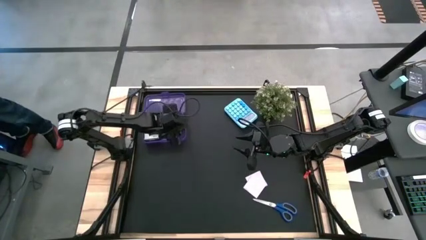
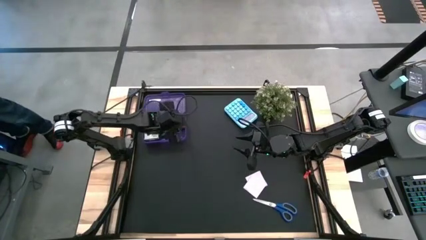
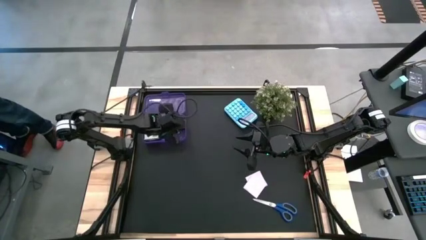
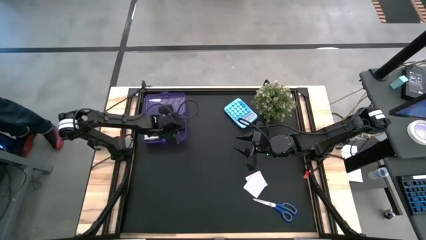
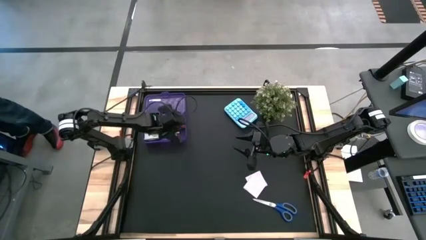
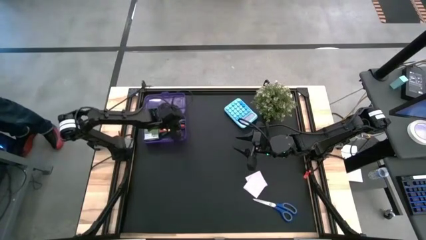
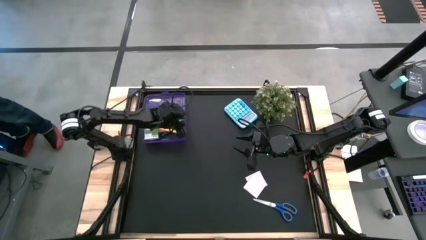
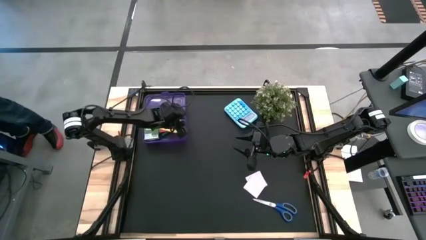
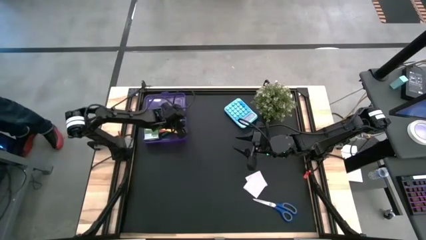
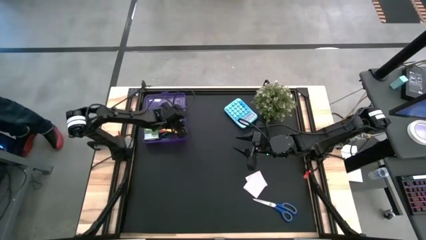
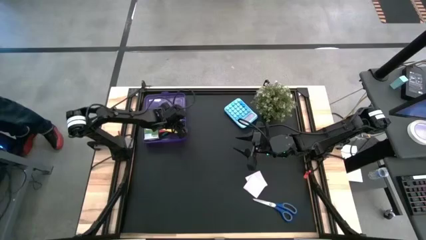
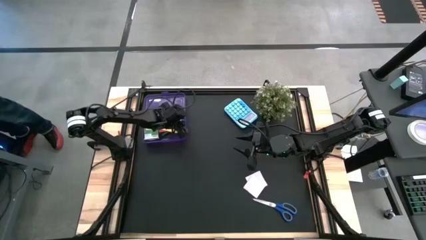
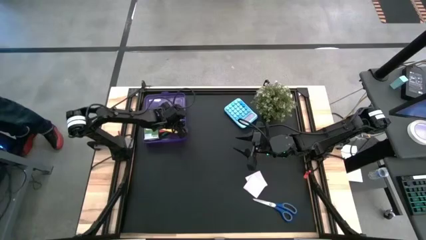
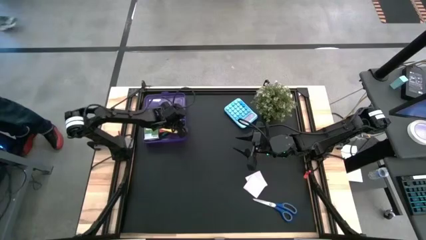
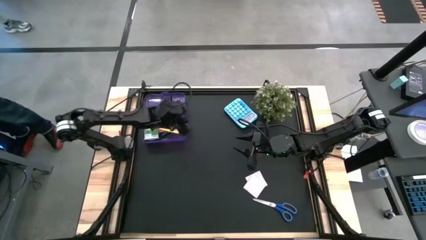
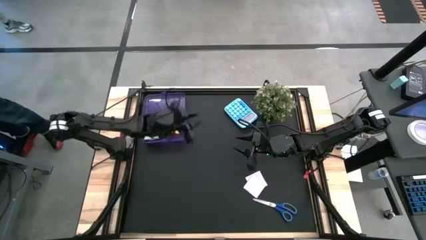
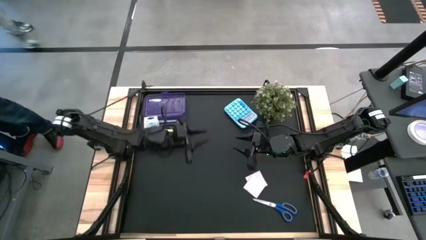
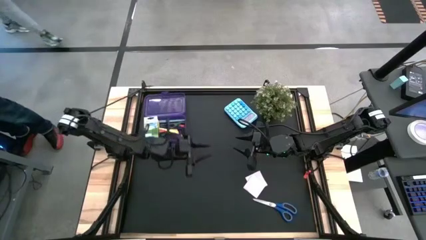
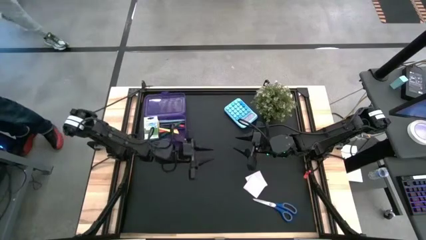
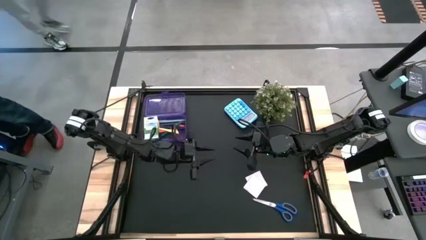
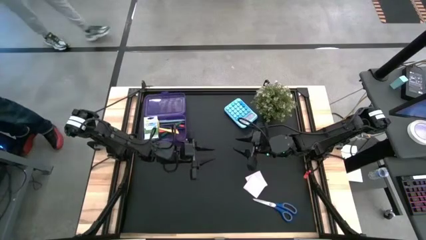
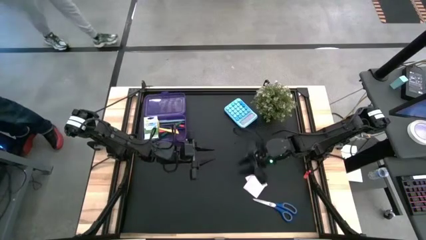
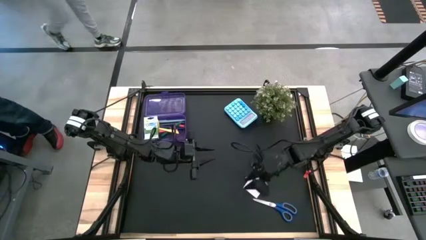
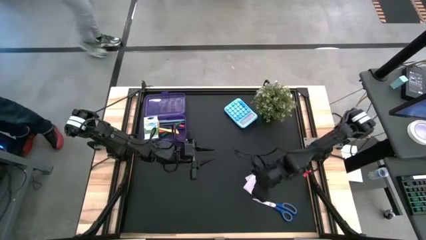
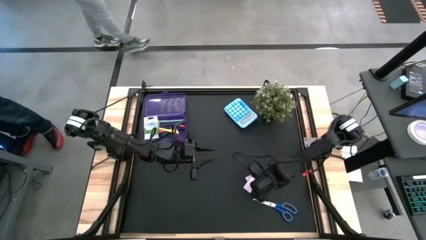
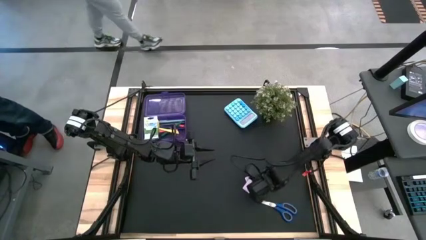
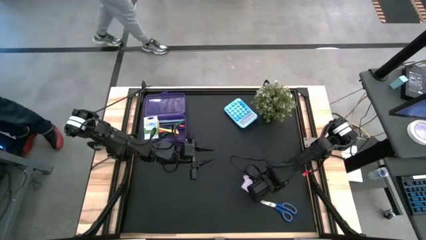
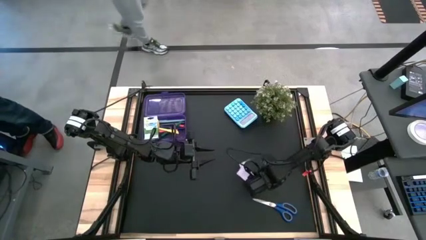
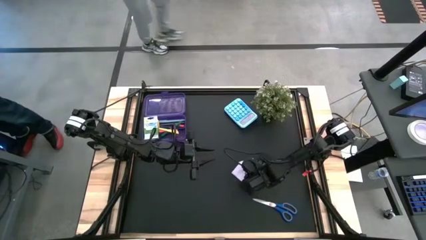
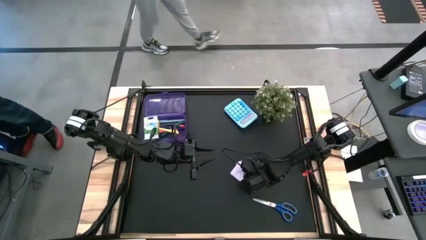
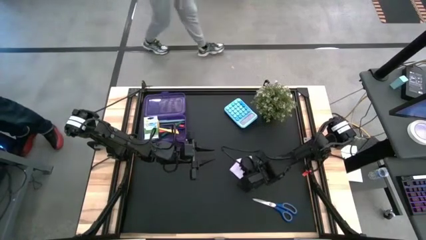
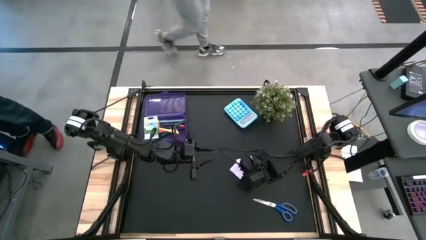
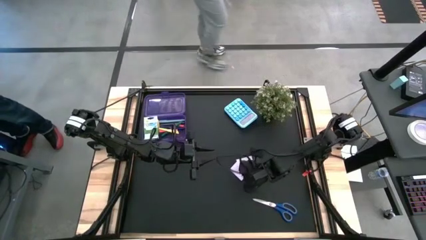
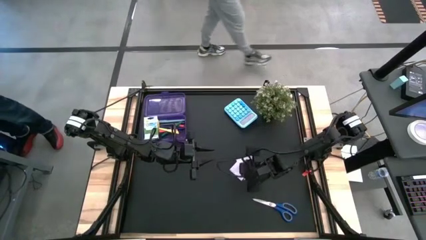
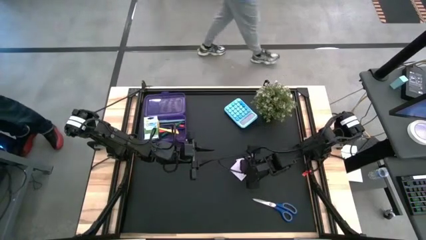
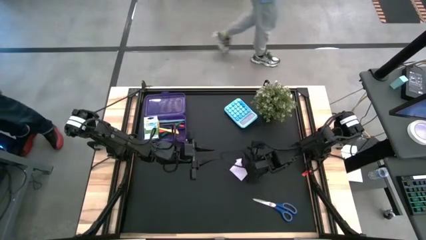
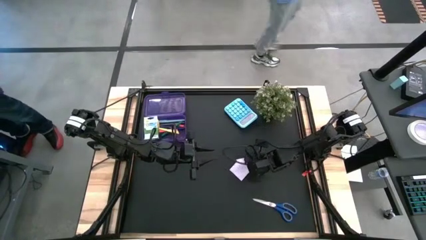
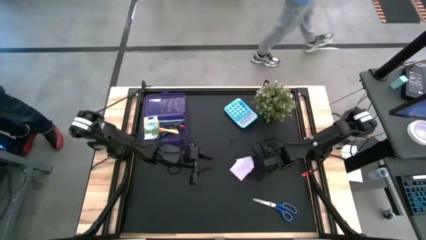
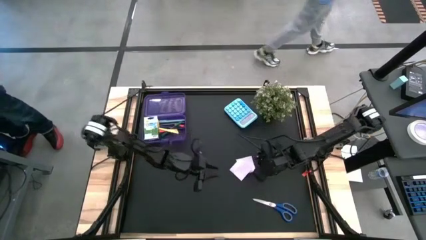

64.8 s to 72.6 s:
Task: Pack school essentials
Put the white sticky notes into the purple supply box

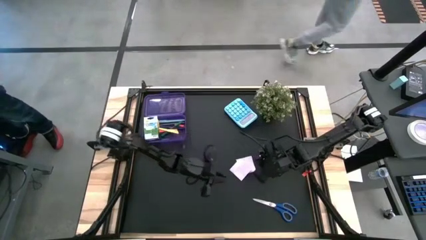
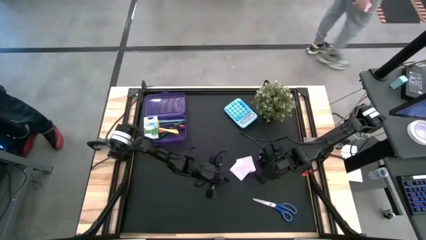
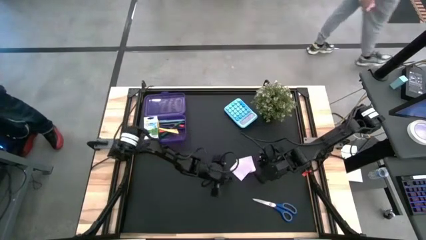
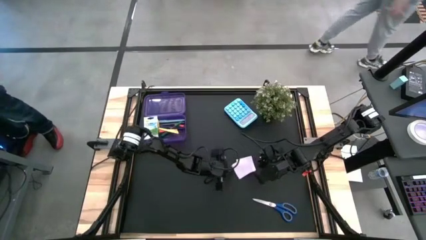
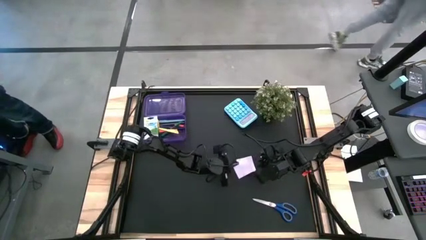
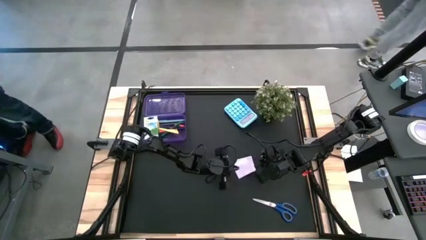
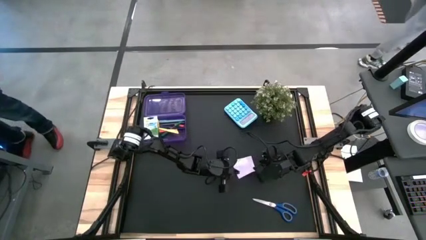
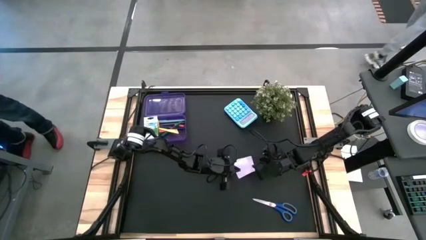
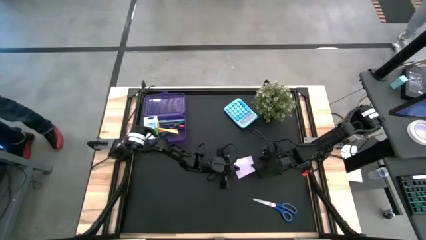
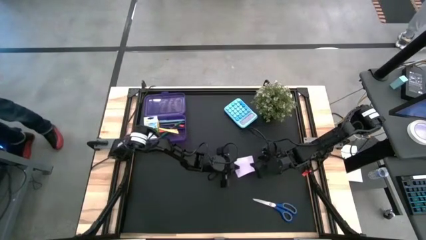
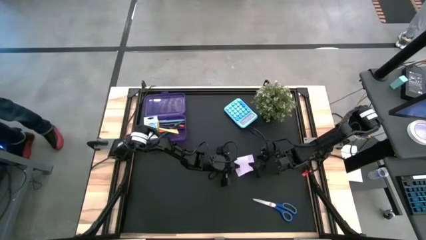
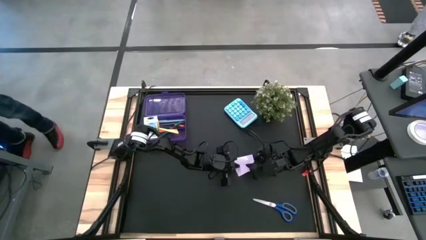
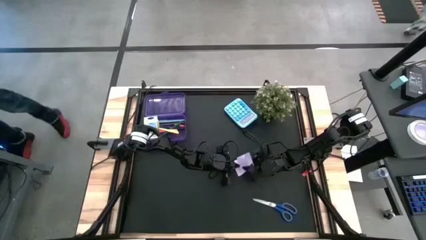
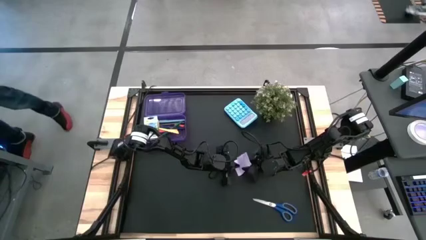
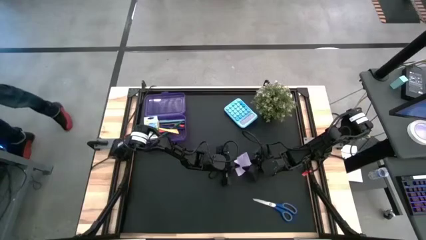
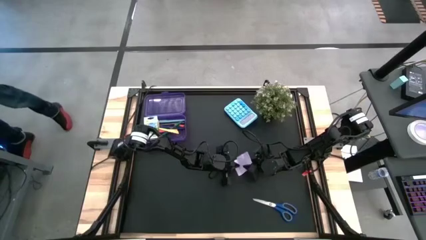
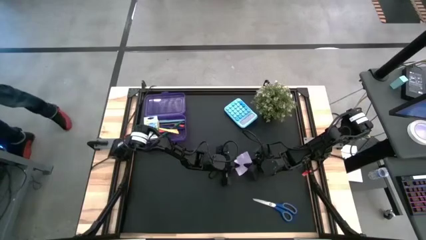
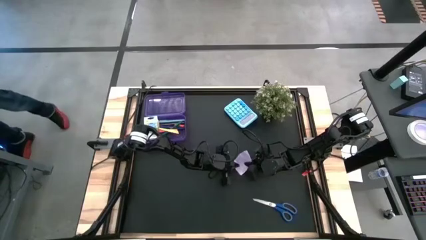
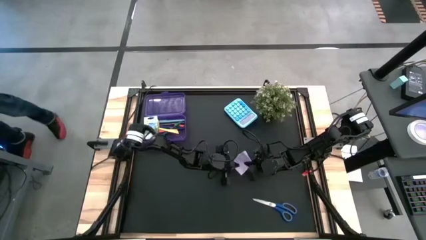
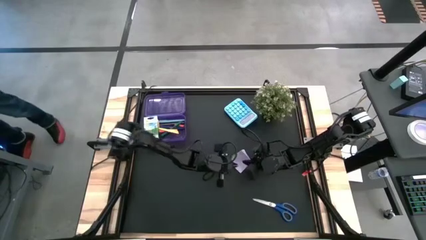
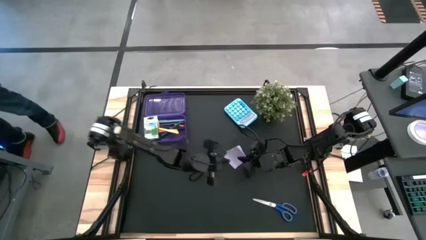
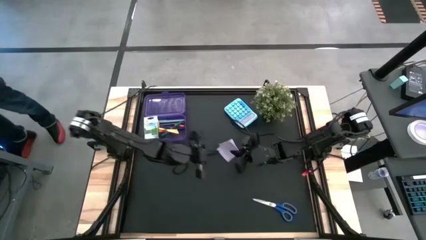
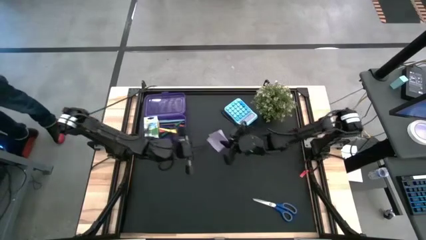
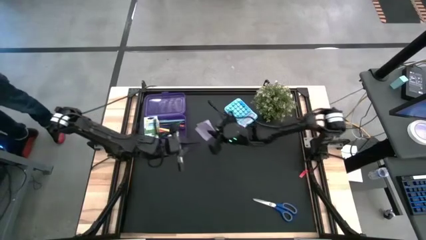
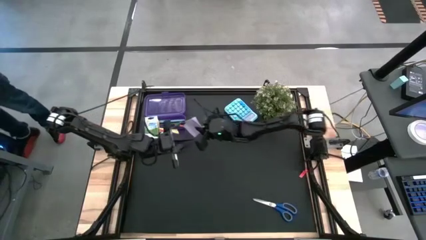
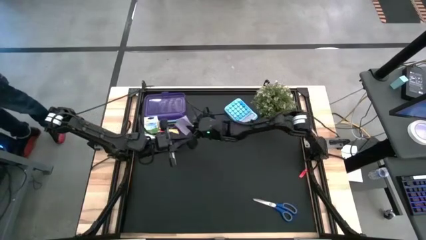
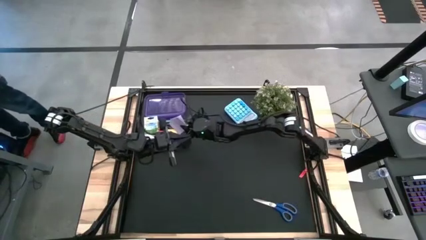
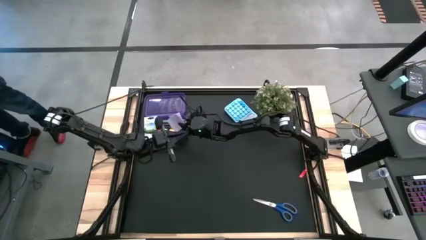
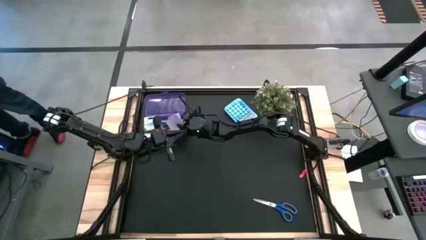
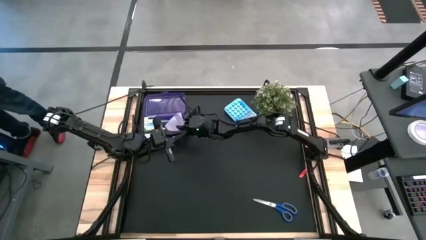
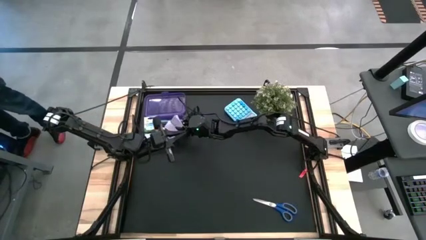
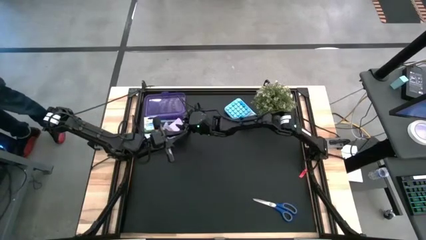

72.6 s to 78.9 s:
Put the white sticky notes into the purple supply box

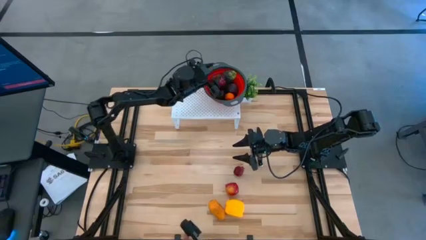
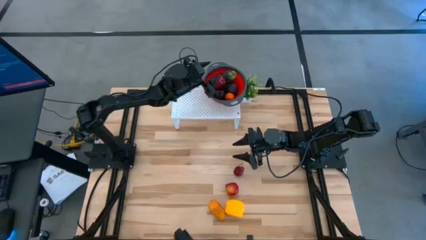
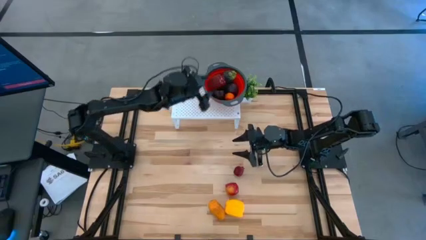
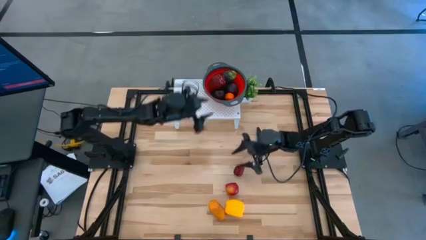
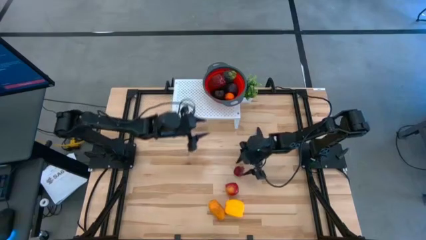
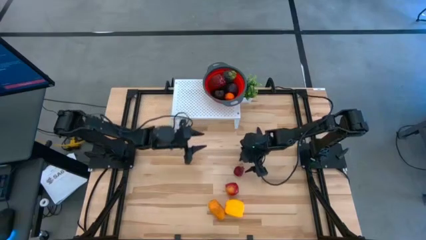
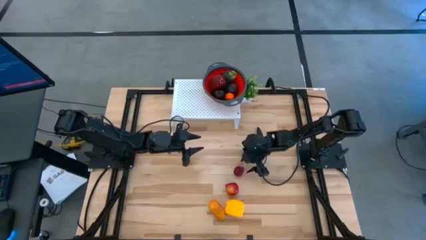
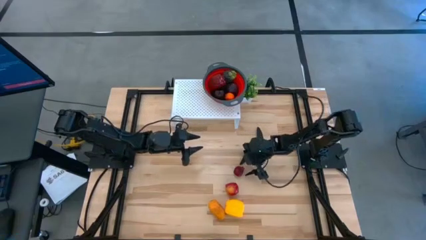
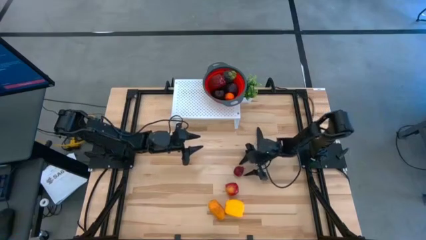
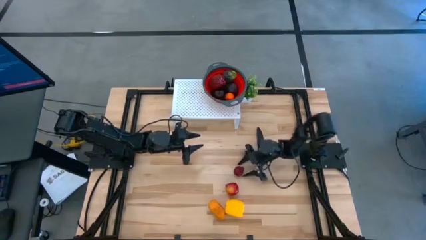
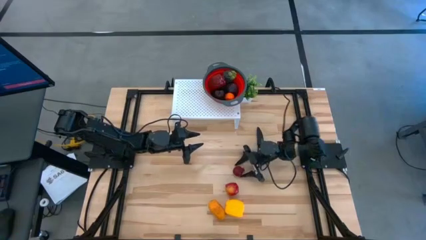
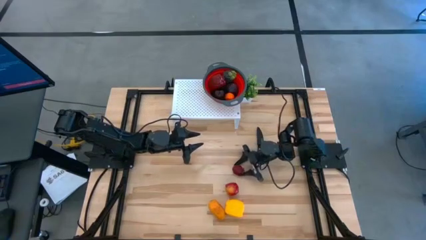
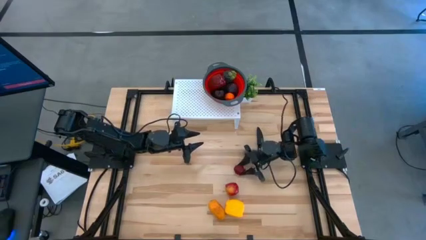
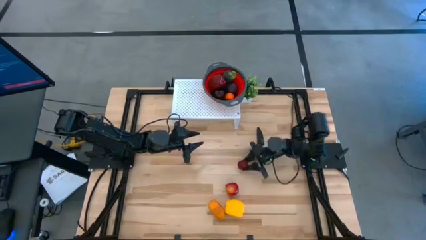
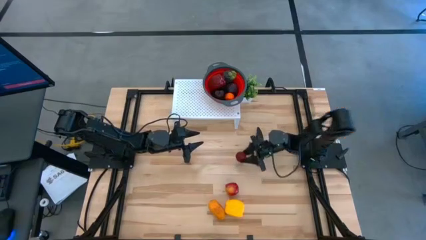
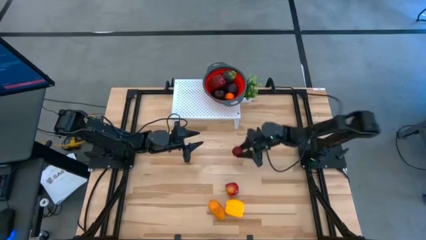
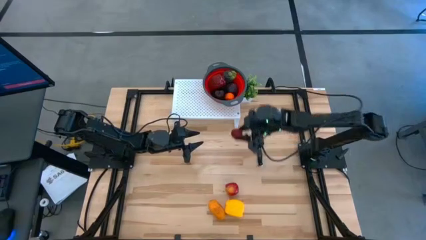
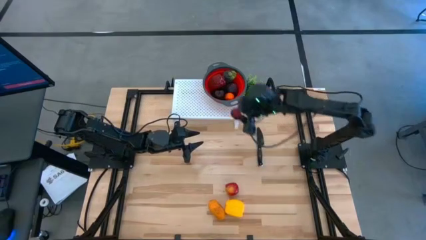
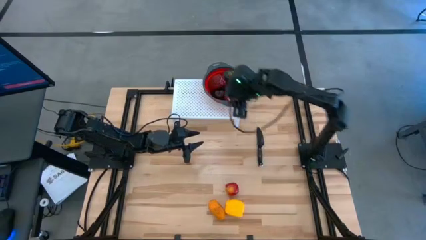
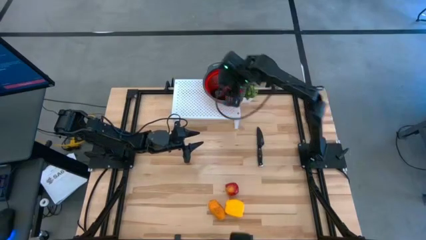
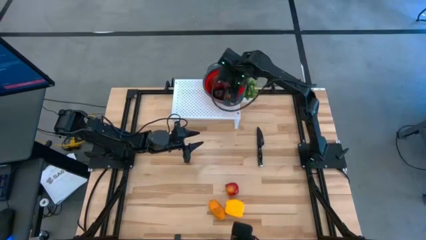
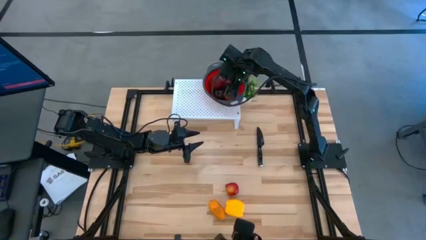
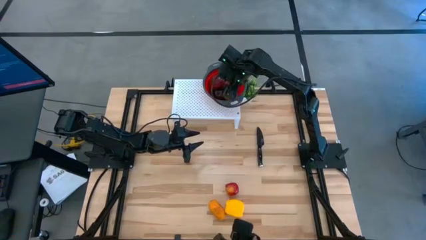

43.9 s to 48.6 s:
Task: Pick & Place Fruit
Put the red pomegranate into the red strainer bowl
